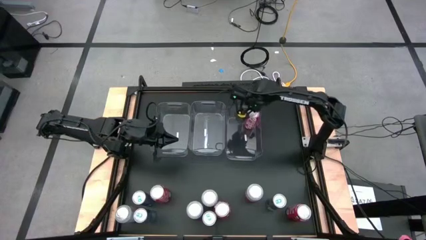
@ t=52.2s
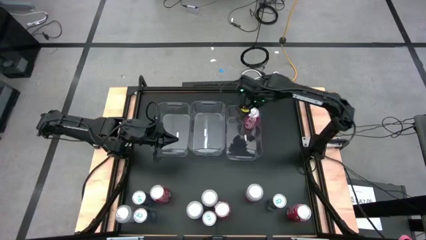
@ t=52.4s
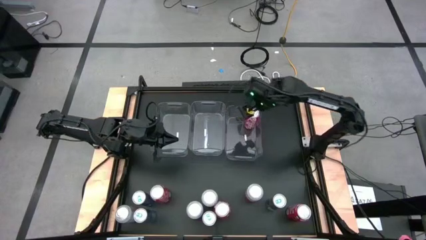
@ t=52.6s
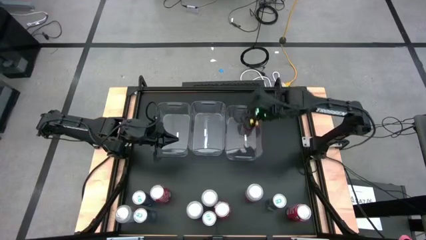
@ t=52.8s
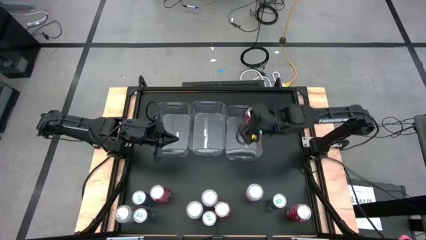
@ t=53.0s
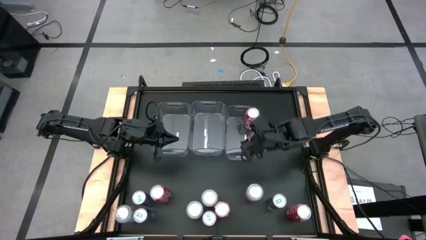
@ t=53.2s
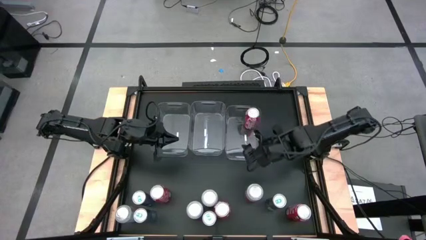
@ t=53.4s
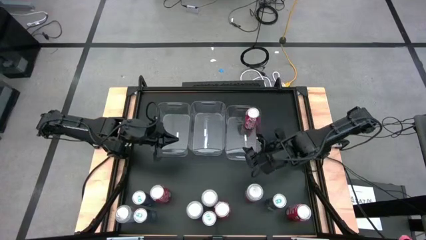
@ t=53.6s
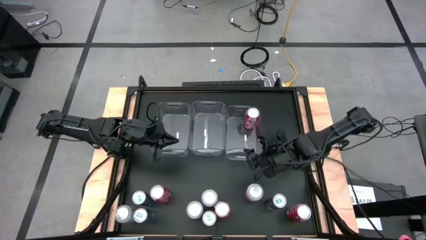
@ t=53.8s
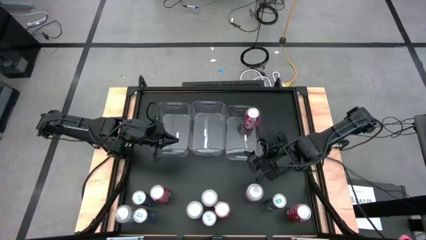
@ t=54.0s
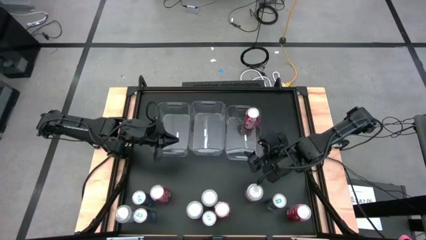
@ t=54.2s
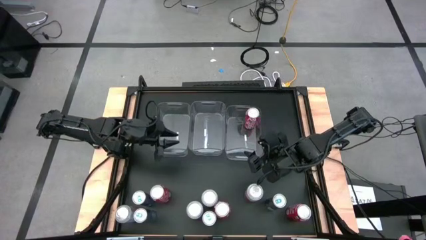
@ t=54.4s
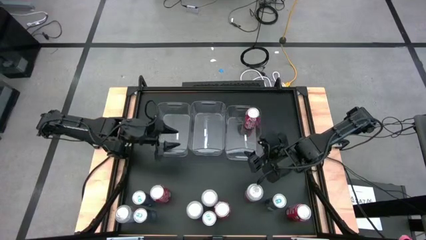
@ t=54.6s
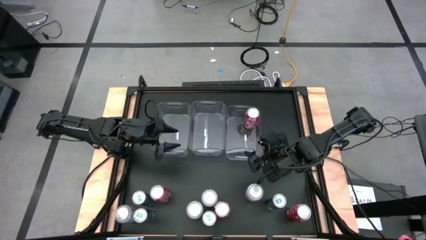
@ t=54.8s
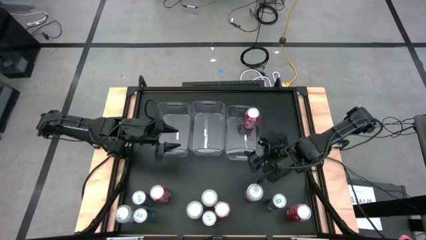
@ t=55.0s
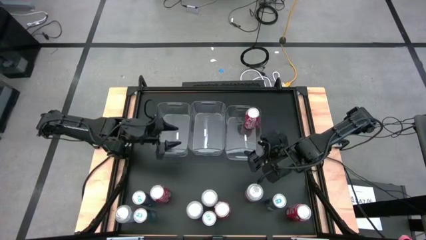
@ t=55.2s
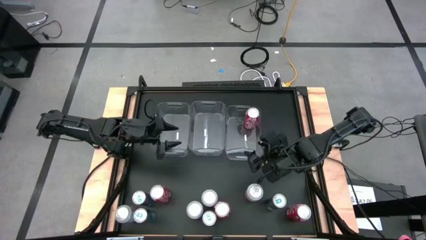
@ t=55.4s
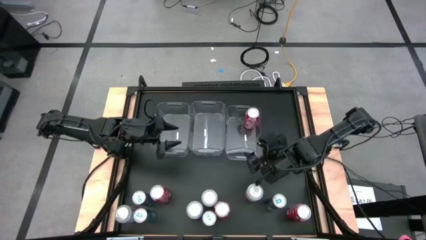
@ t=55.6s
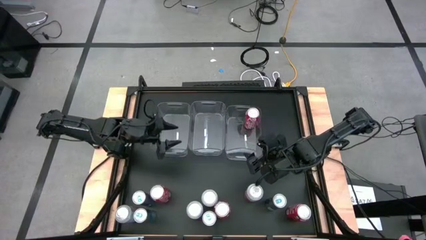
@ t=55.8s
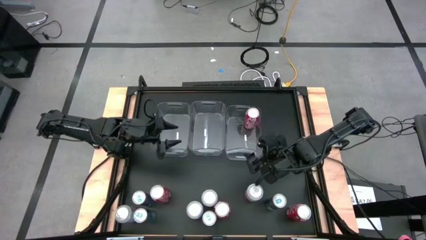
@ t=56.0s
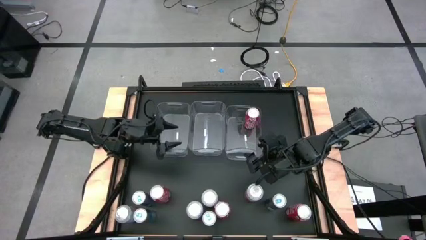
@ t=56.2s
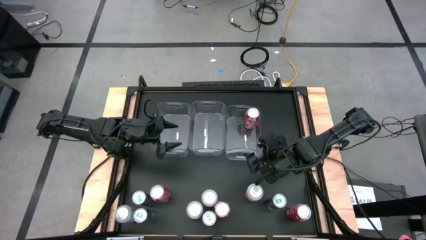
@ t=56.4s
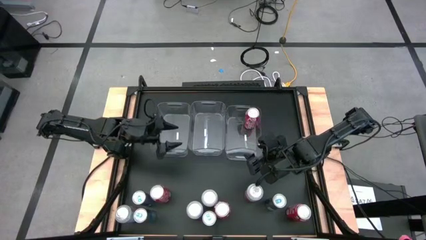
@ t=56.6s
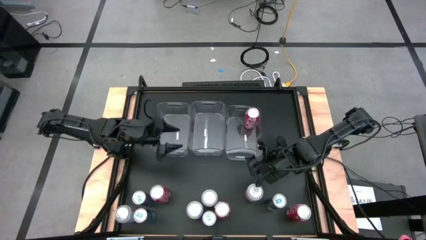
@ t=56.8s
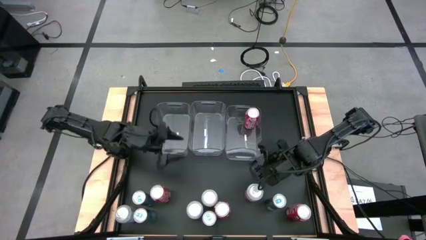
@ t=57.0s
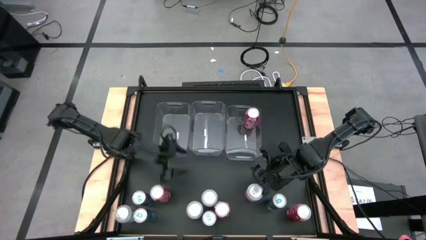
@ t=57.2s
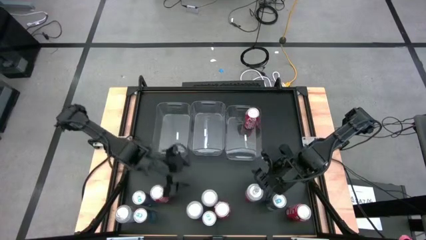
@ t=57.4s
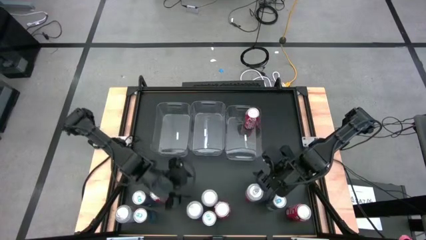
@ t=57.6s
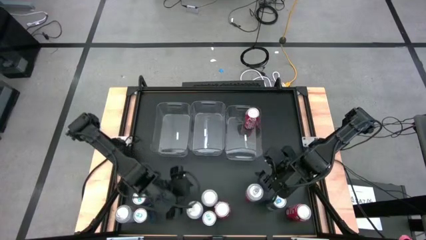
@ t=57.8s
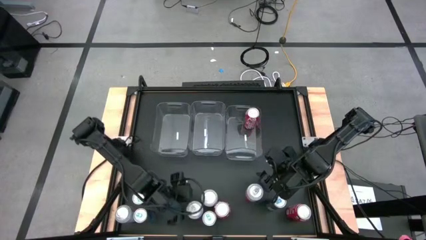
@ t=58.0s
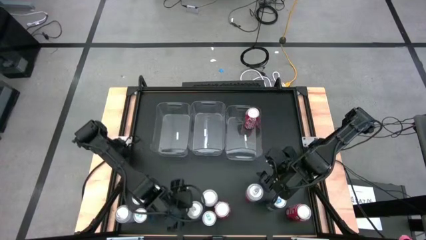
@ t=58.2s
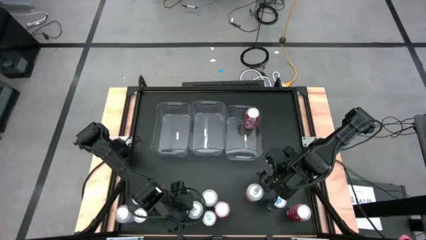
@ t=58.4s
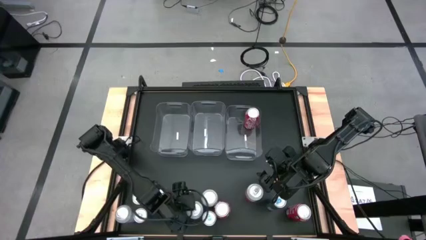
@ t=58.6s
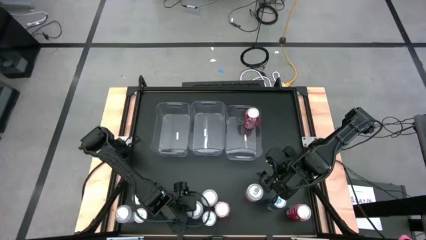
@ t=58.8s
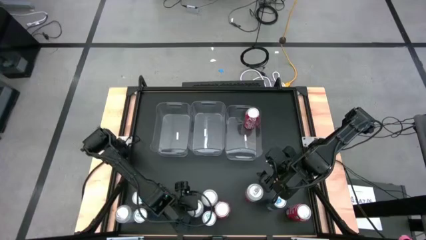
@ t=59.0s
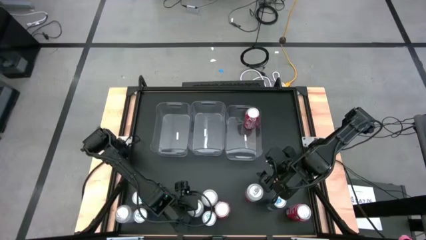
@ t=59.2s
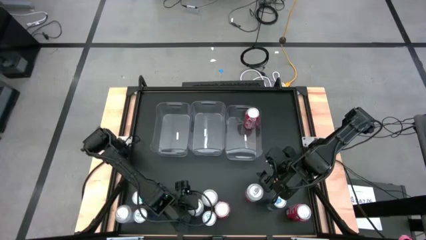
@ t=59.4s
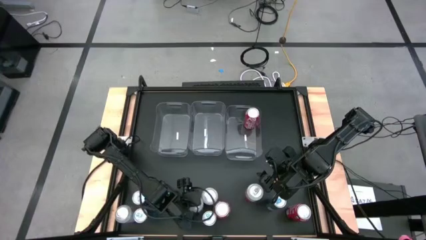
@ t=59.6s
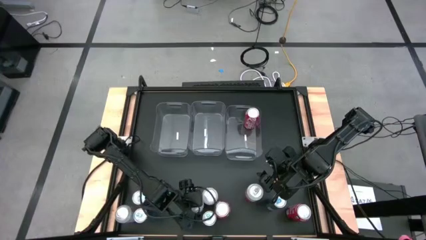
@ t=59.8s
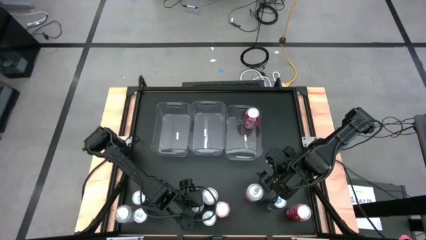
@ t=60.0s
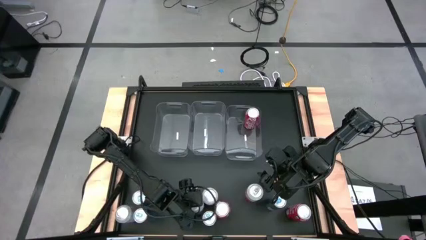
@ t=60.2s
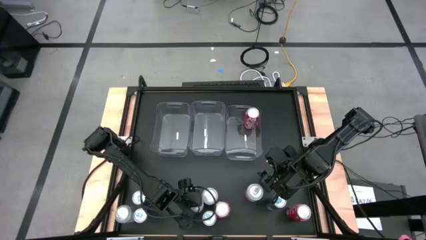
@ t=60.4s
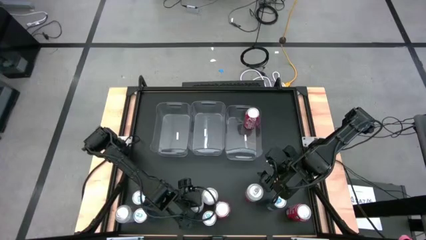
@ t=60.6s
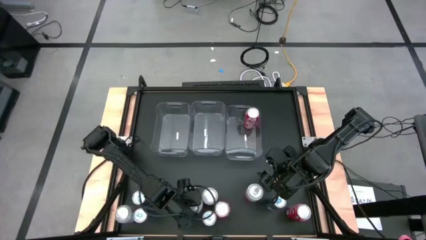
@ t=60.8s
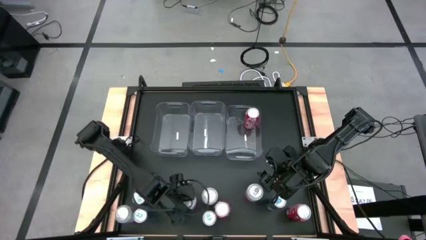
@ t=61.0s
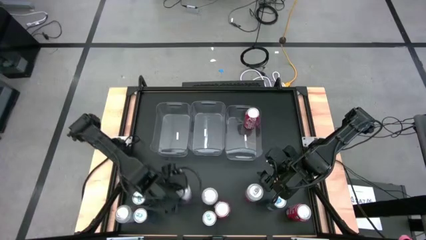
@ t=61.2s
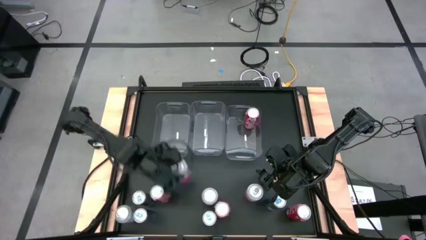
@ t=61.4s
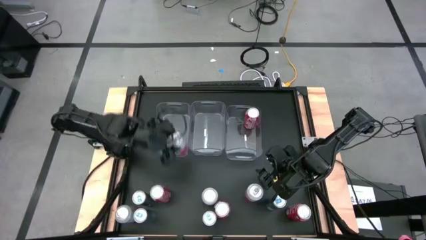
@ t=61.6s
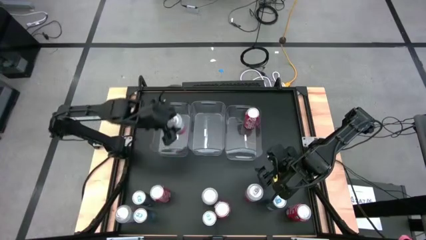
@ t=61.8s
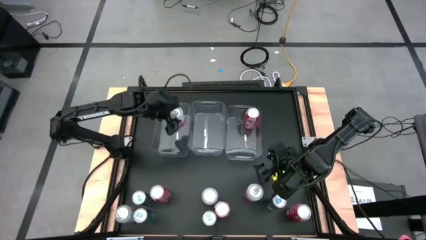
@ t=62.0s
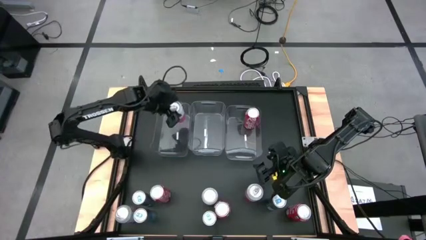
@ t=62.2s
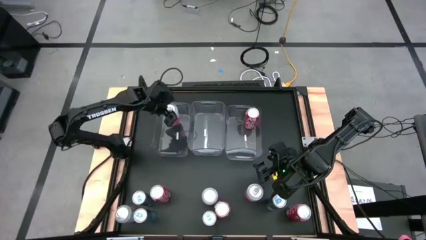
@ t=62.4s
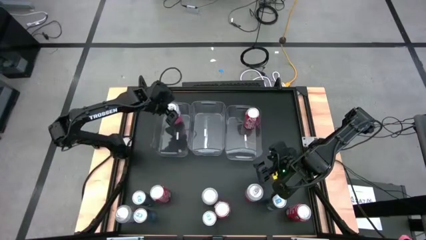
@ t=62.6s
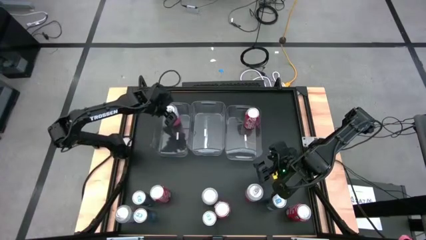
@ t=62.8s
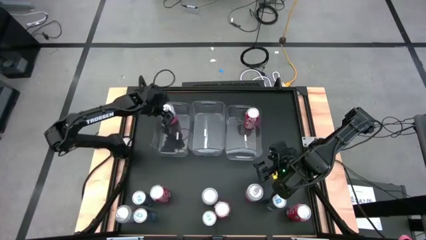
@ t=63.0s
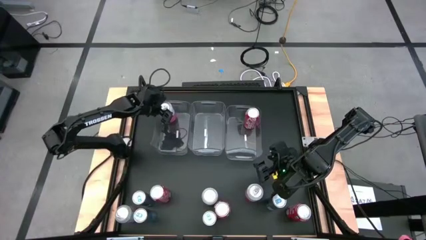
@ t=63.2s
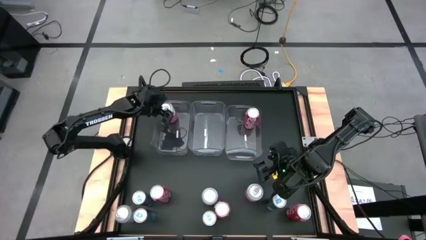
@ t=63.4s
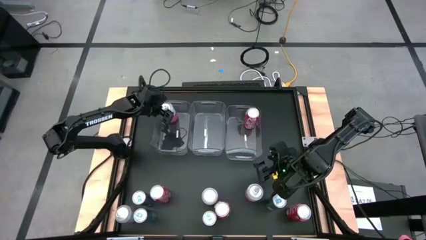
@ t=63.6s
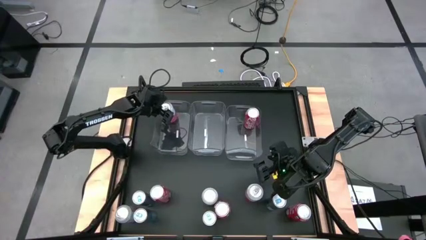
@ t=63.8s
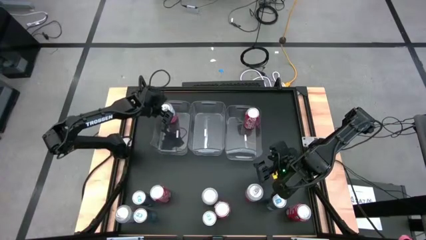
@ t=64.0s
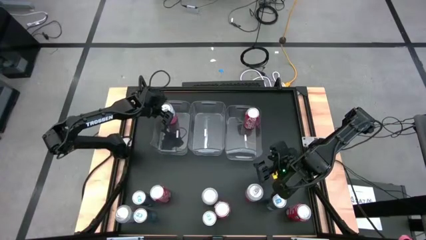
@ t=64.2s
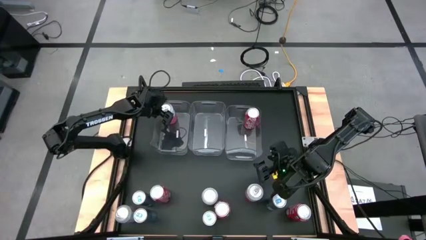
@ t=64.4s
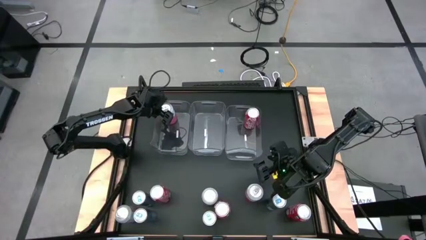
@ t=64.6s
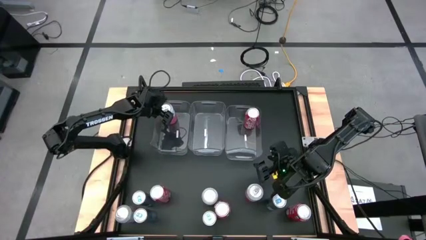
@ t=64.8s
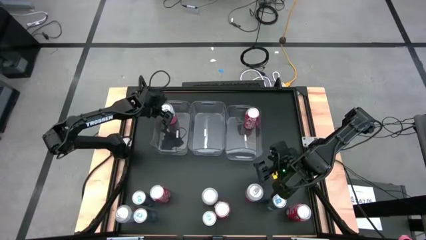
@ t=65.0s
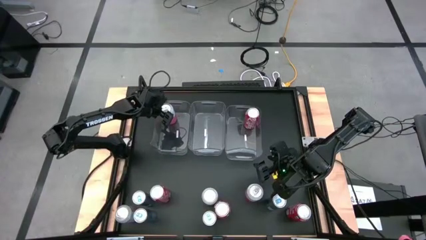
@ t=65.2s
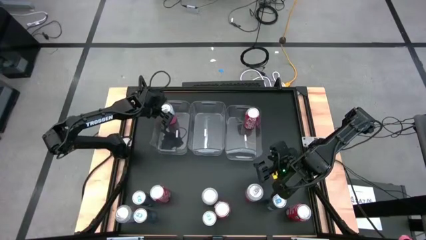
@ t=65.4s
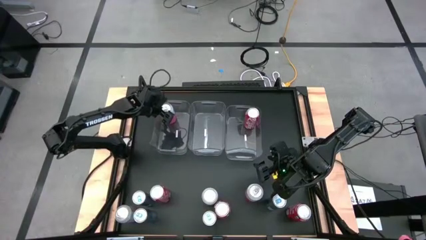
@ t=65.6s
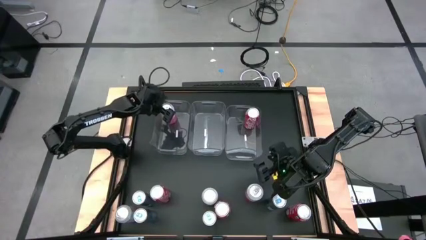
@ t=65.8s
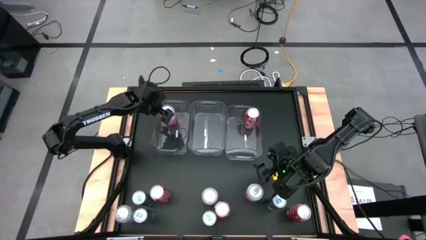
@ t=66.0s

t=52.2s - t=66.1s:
Task: Sort soda cans
Put the pink soda can into the left transparent bin
